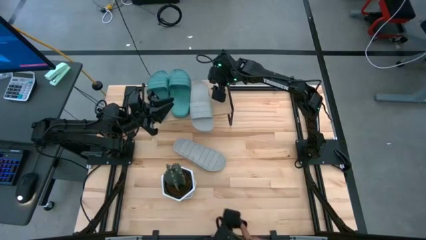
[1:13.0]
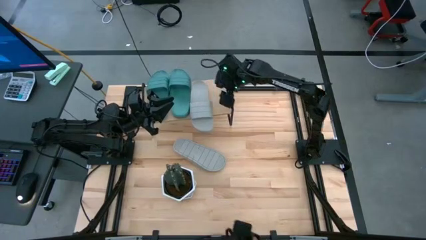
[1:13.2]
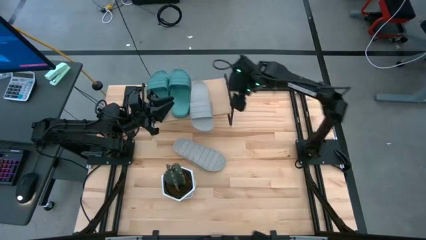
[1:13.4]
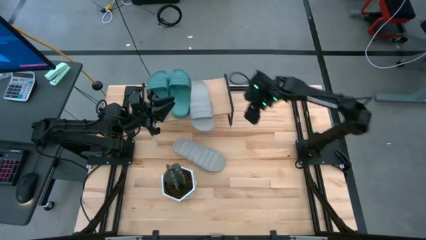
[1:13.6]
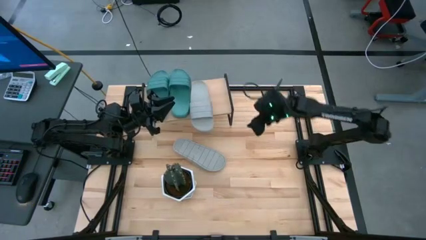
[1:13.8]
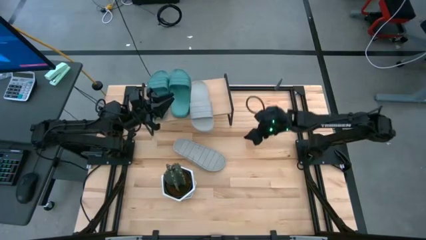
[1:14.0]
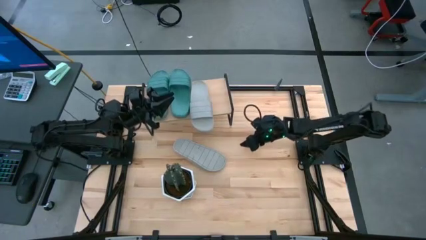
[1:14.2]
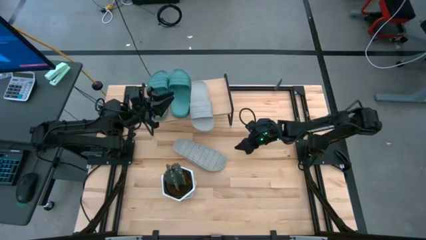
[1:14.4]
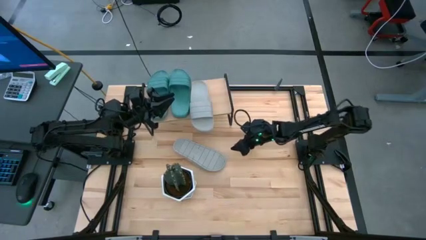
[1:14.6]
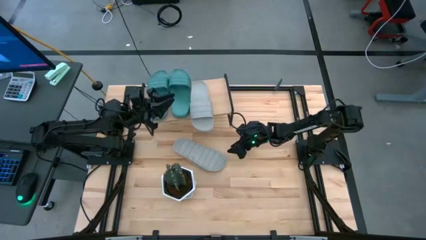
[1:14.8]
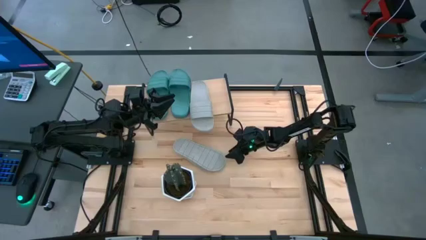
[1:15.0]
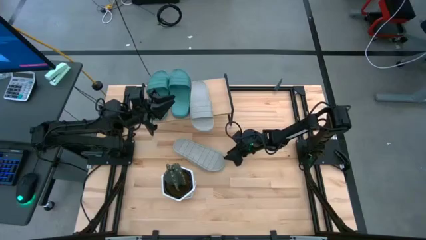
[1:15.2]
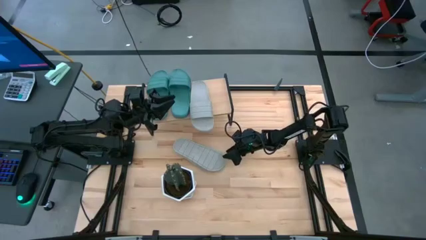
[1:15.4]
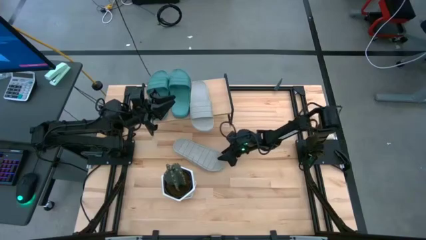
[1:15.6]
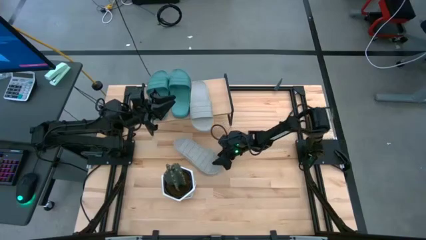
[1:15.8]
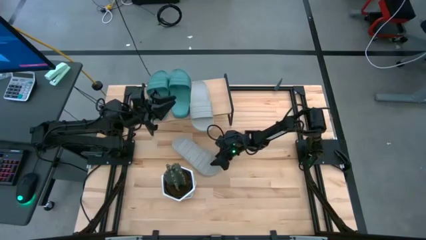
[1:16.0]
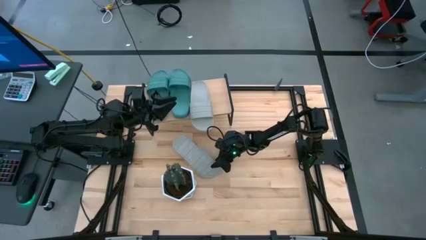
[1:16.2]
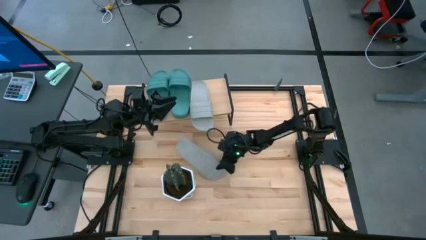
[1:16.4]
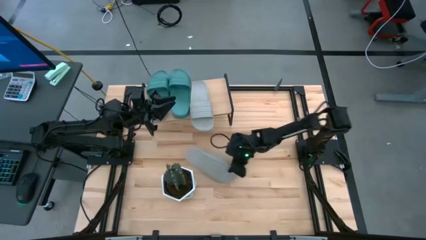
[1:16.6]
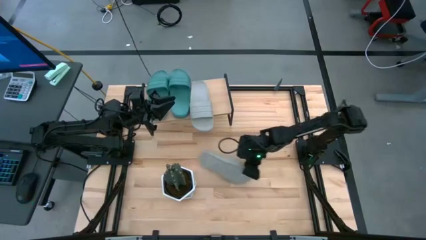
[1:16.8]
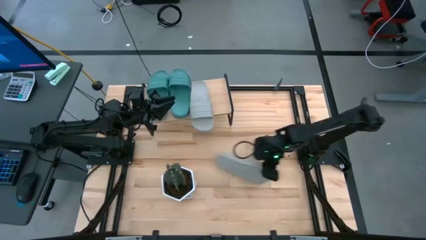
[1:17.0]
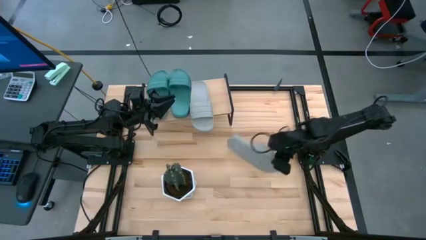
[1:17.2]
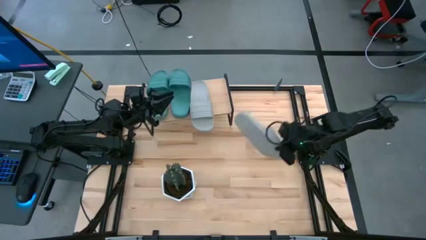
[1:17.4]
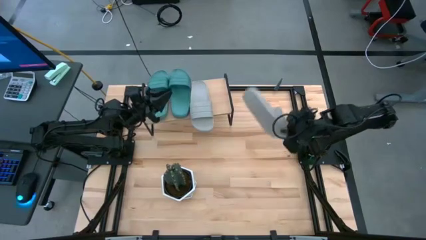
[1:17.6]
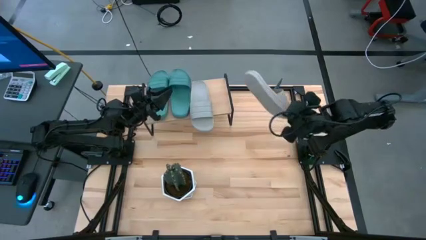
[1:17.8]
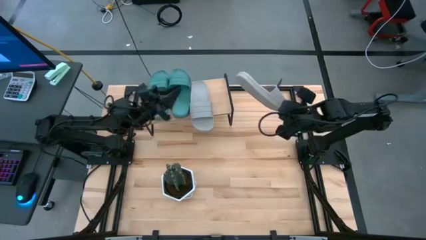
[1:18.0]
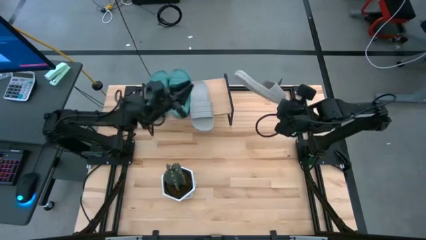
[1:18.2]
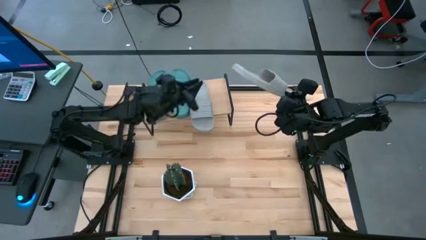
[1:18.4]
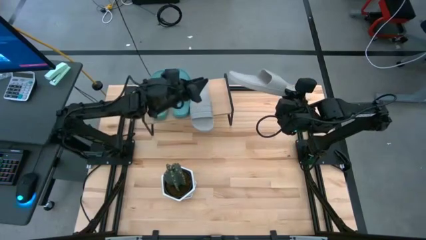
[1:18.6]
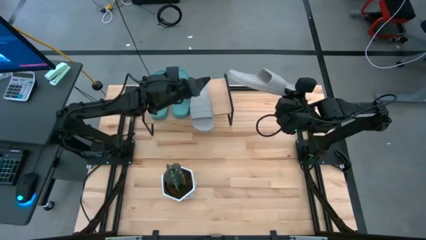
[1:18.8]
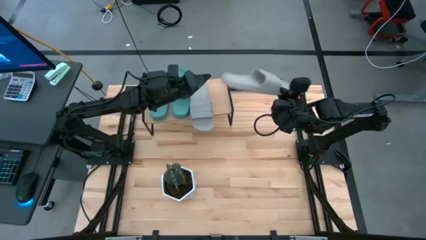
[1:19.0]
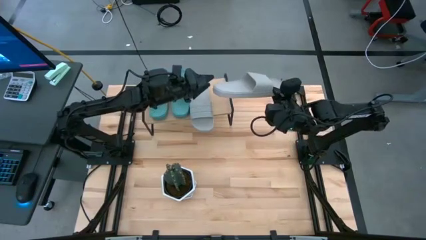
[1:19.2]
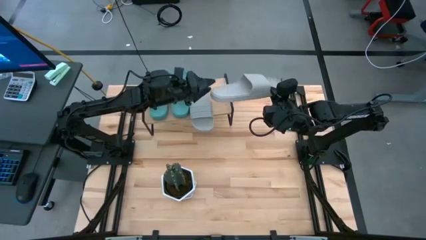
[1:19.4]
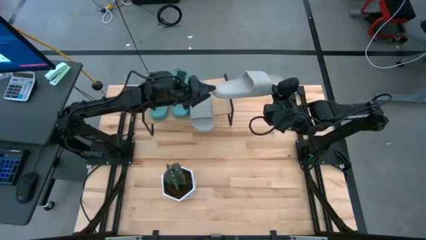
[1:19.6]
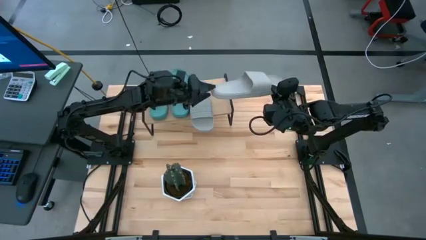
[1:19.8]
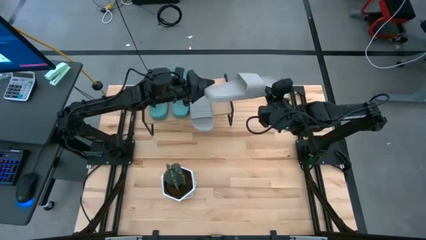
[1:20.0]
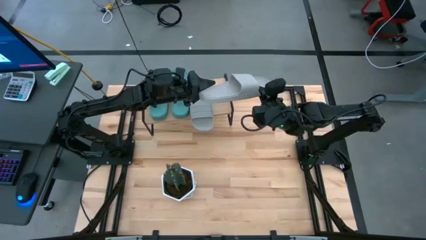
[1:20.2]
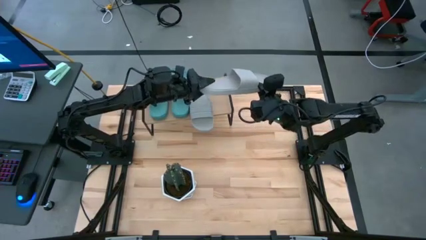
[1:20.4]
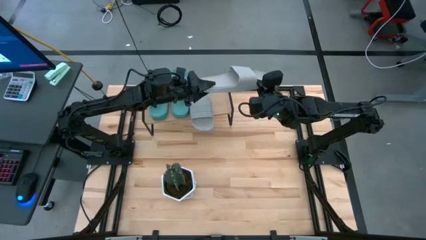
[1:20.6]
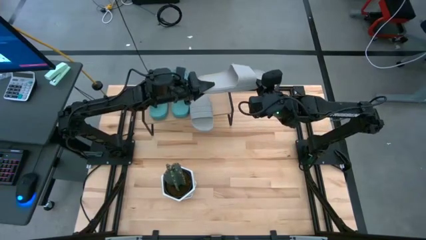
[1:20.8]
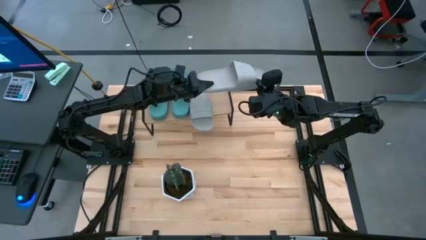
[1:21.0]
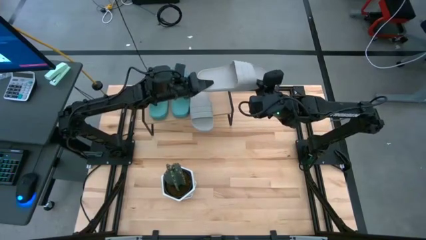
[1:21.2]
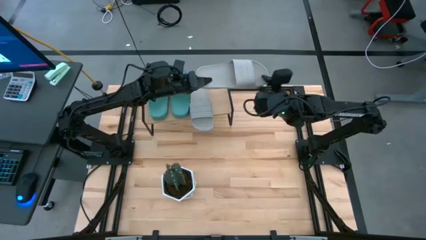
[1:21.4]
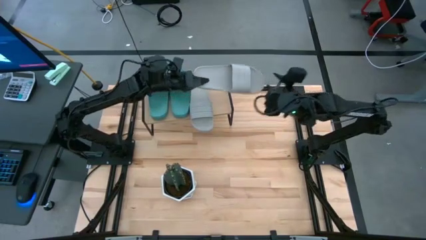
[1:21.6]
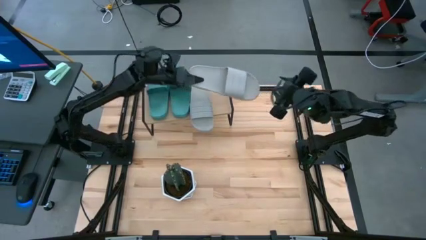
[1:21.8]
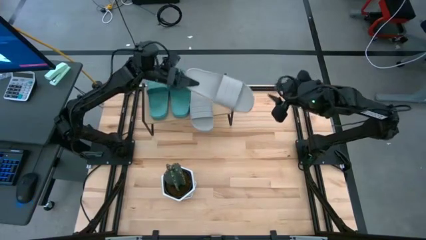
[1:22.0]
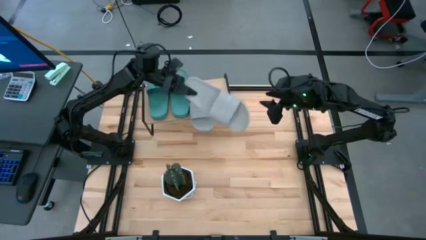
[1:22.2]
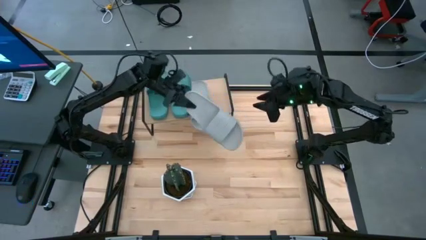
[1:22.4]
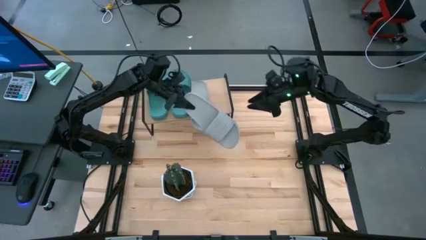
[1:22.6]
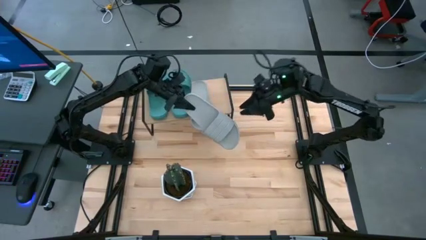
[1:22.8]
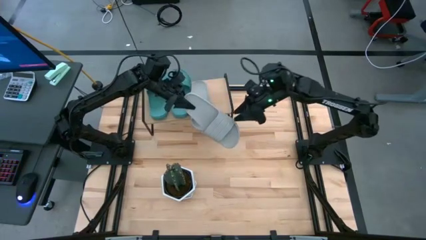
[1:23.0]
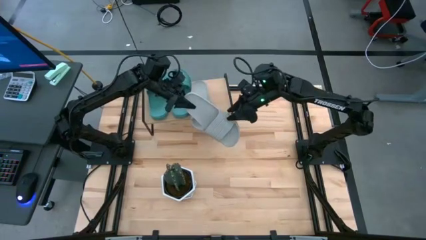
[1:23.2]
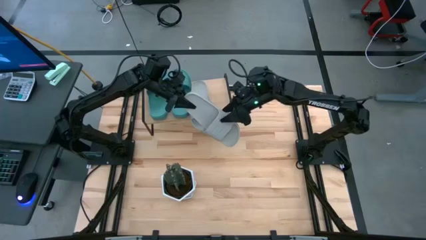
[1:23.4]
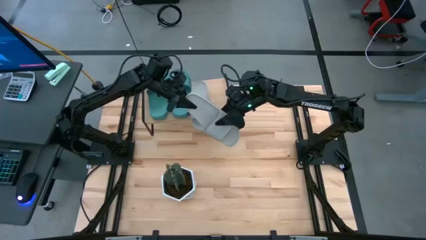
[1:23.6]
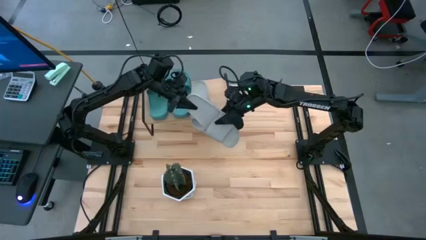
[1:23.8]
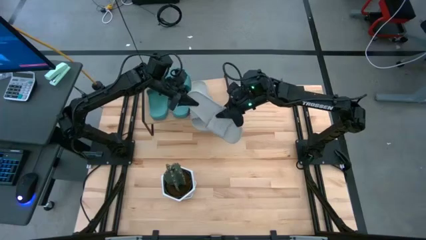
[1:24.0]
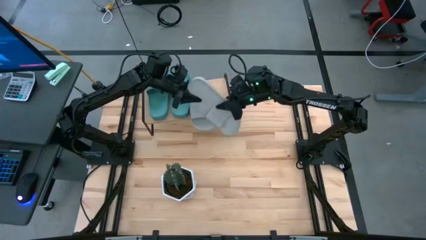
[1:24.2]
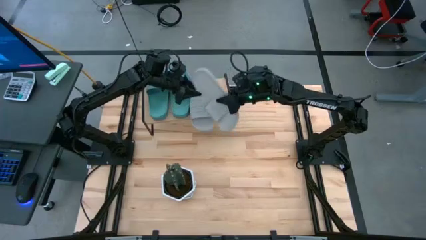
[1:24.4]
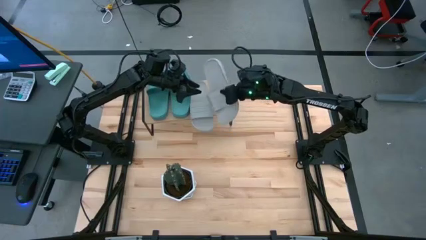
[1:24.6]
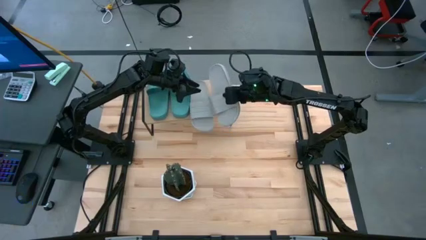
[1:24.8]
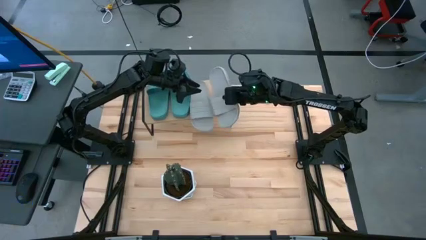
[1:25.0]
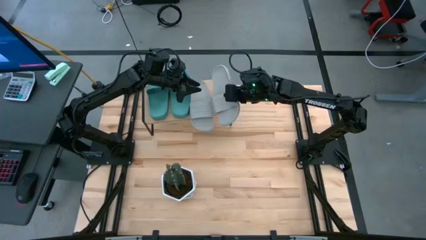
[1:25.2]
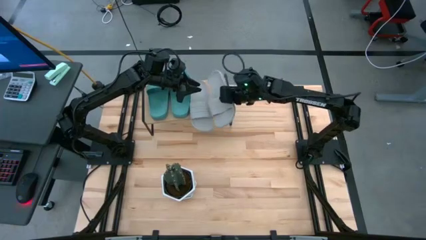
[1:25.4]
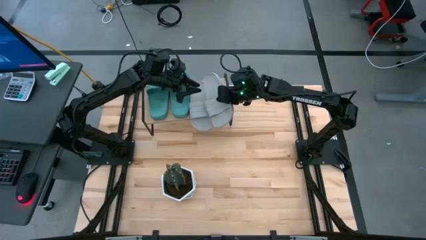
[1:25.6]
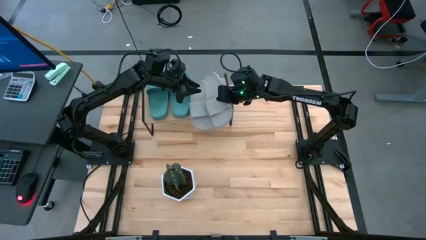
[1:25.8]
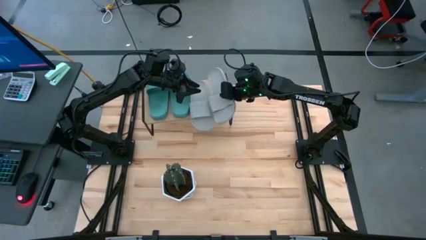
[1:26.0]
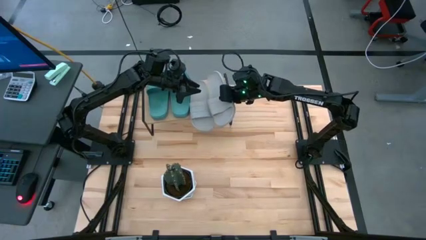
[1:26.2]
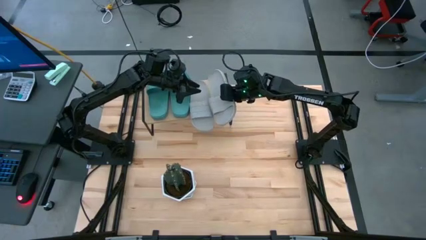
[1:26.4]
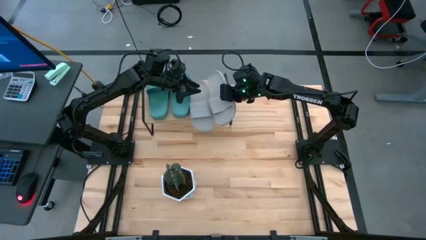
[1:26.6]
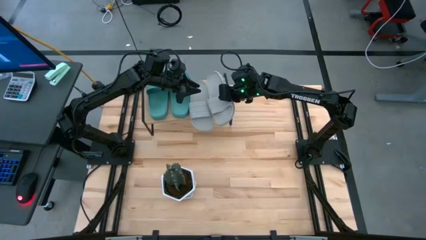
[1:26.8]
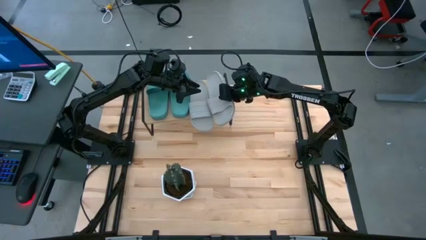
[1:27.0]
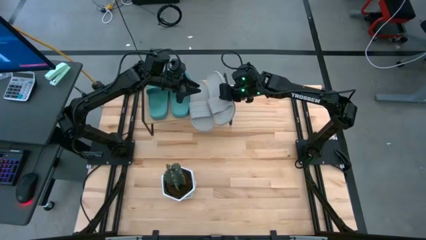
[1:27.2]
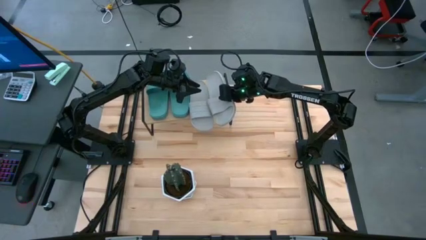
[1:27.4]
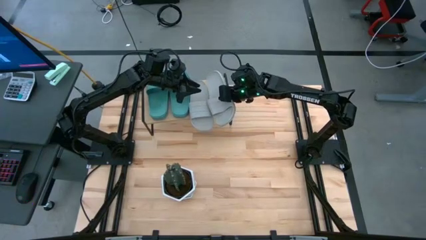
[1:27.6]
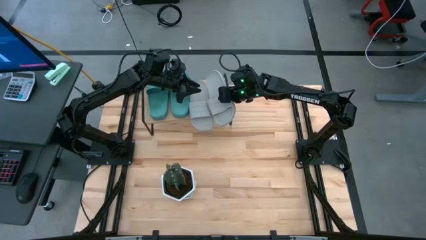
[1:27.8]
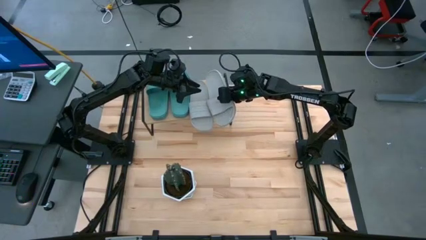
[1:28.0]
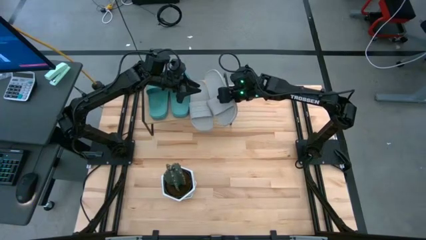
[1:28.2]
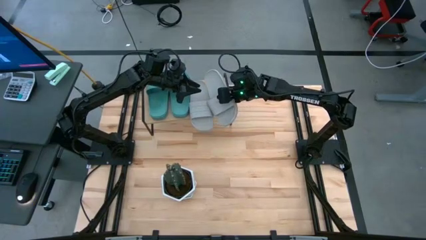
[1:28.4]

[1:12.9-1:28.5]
Task: Pick and place slides into the shelf
Put the gray slipper on the shelf
